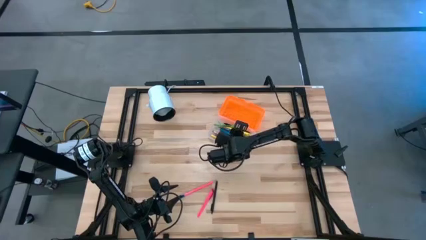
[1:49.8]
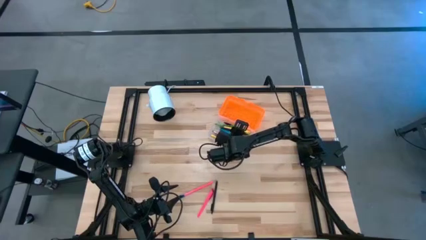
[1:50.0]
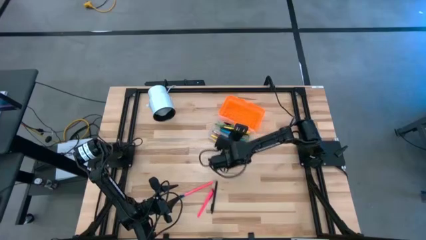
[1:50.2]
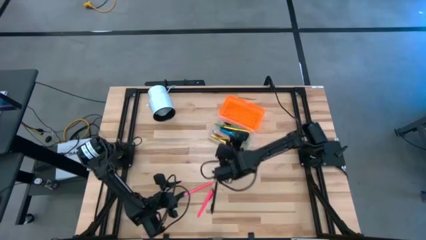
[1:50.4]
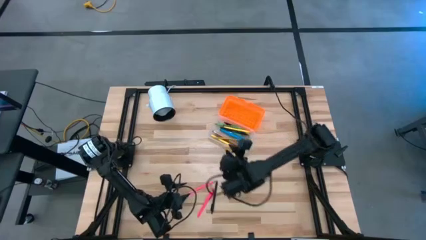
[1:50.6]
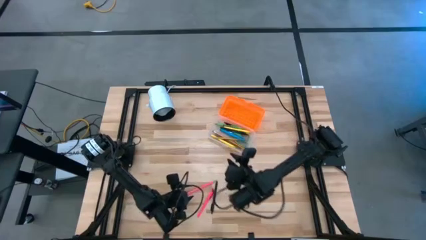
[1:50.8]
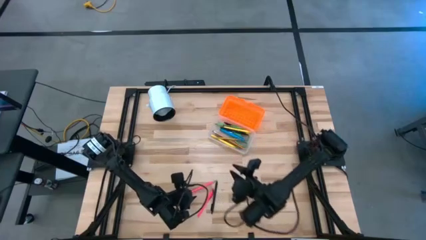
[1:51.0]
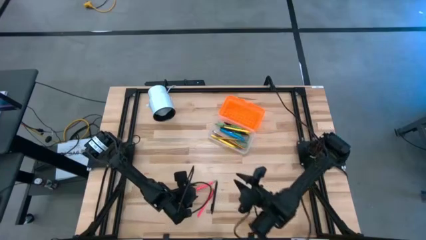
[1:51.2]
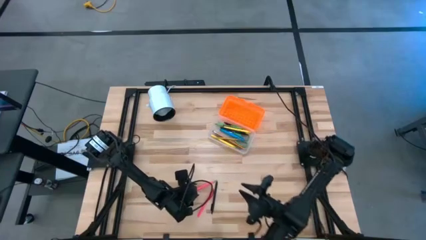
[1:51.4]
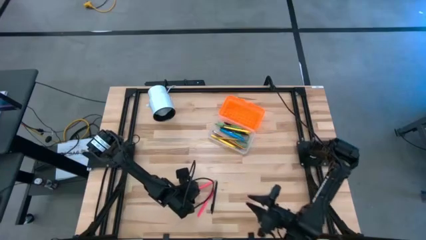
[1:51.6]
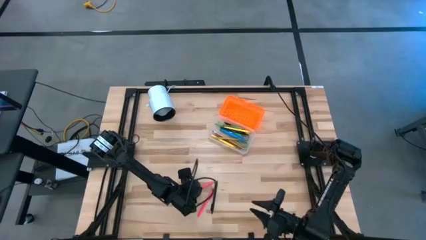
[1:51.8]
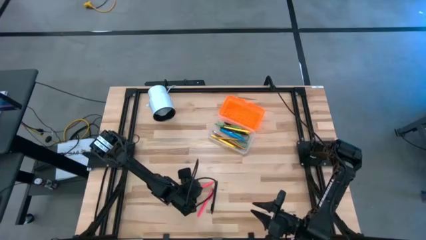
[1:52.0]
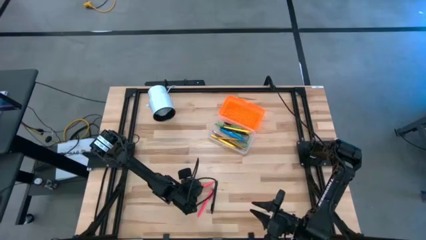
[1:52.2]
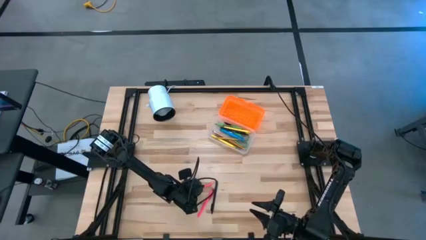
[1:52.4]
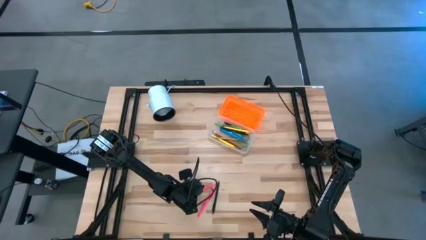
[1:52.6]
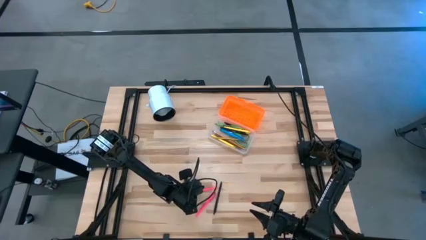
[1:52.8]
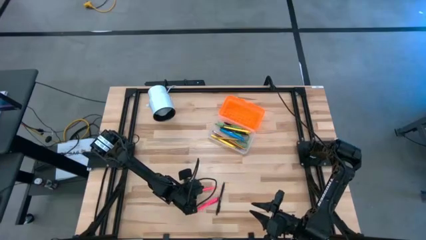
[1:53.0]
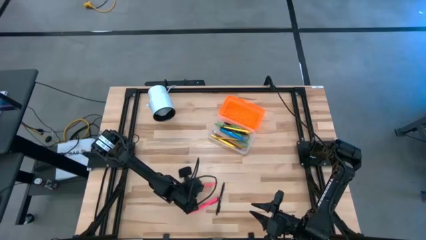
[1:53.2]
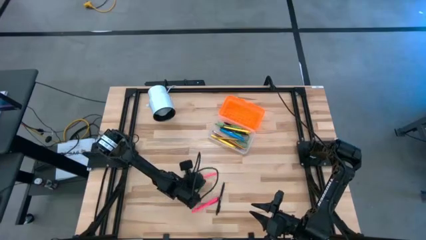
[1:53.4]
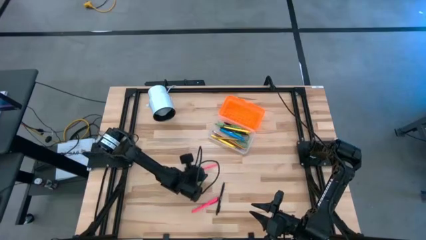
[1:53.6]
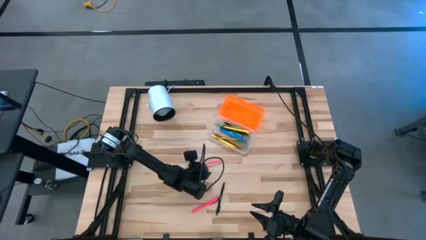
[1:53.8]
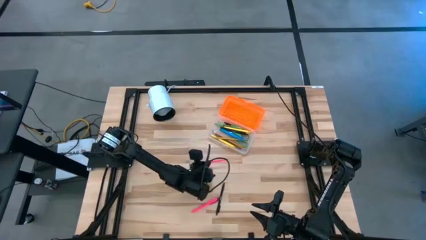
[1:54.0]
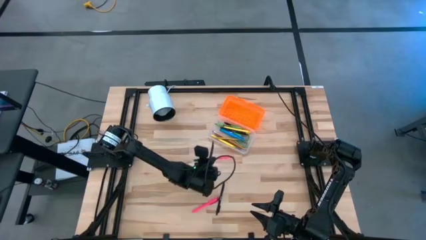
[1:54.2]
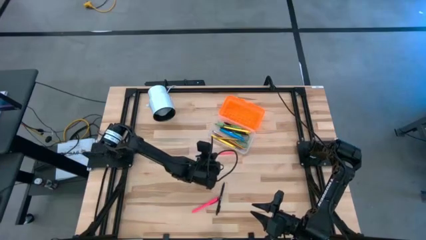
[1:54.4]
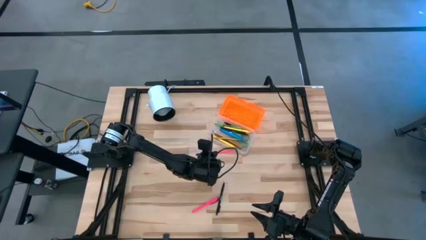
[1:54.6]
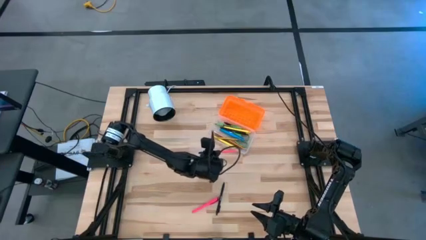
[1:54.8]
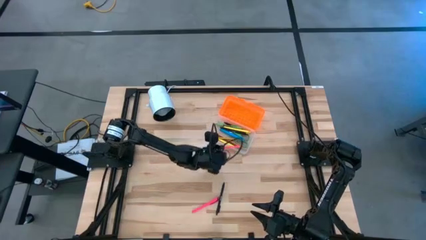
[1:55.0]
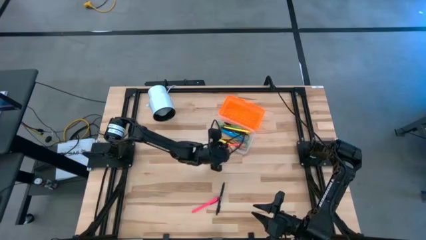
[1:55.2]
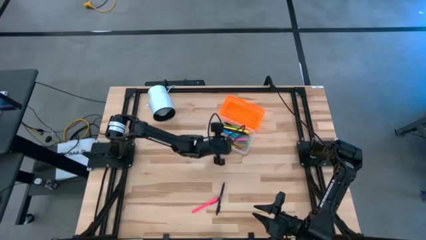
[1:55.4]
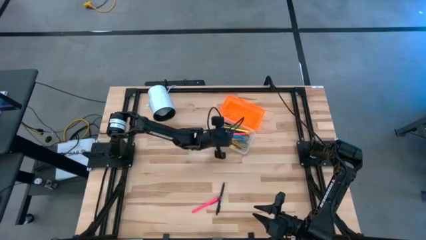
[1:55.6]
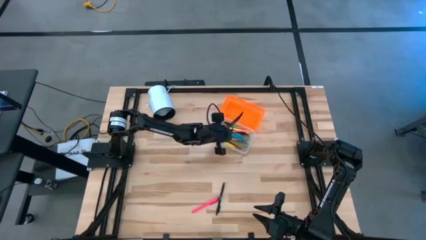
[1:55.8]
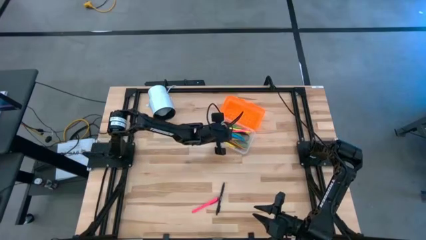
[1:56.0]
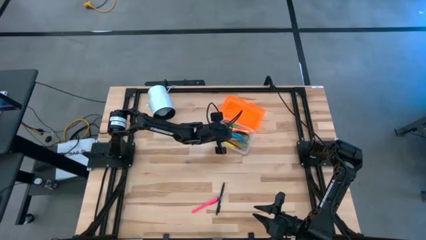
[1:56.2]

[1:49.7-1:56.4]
Task: Pick & place school supplies into a supply box
Put the pink pencil into the supply box

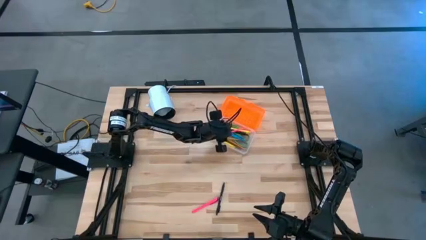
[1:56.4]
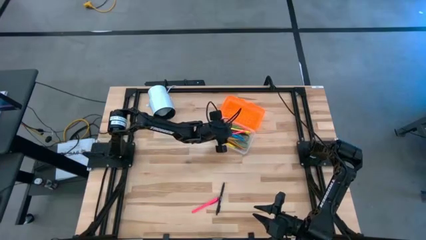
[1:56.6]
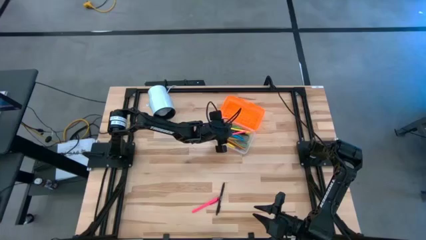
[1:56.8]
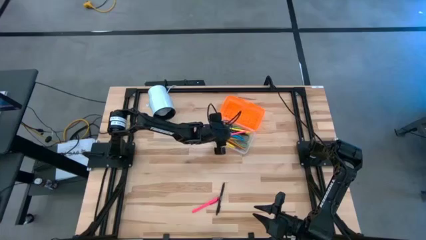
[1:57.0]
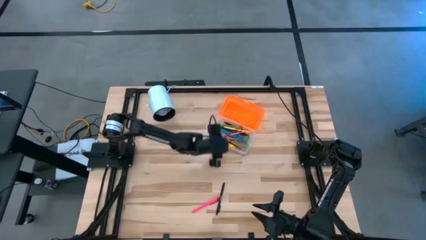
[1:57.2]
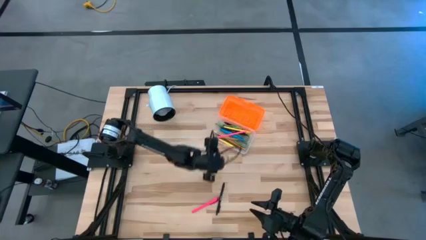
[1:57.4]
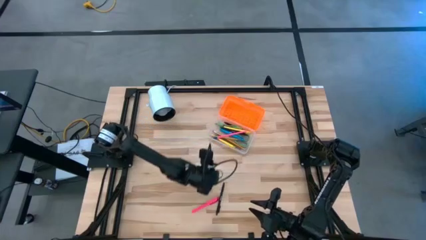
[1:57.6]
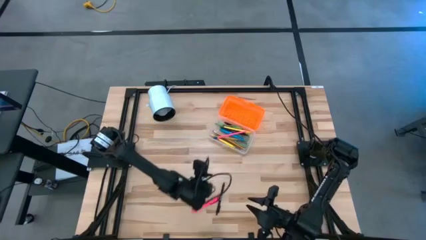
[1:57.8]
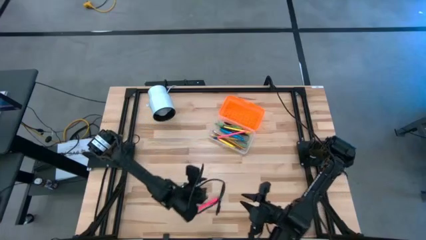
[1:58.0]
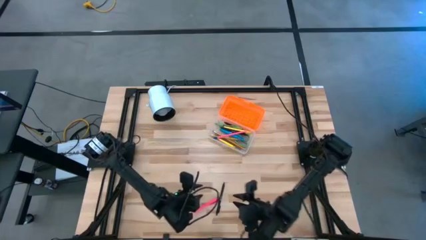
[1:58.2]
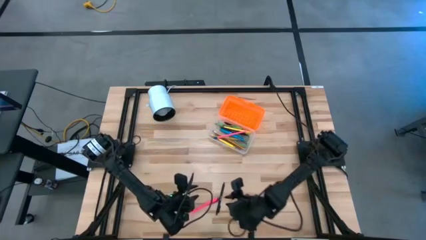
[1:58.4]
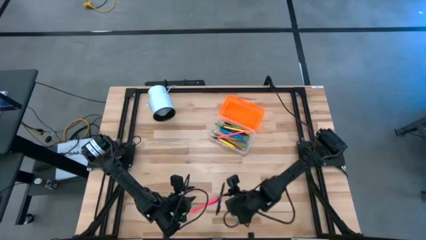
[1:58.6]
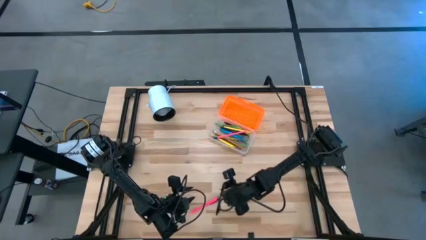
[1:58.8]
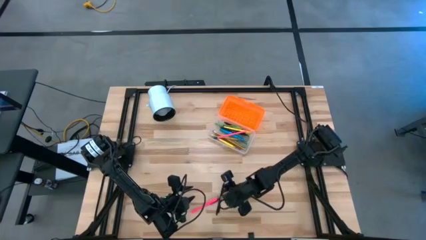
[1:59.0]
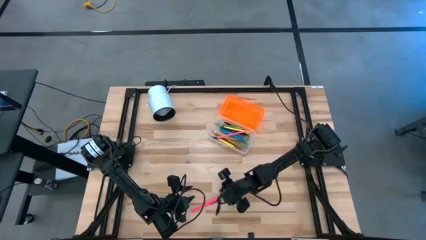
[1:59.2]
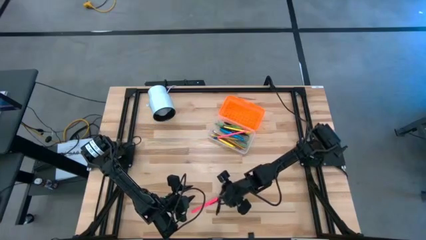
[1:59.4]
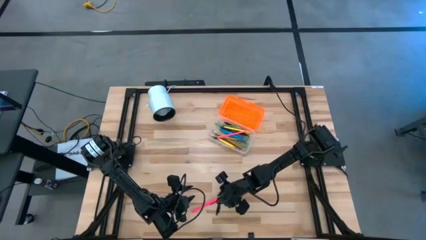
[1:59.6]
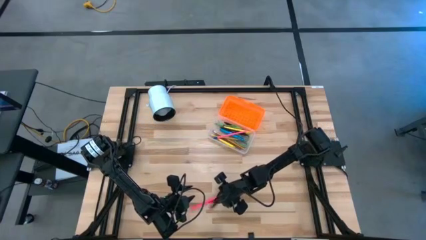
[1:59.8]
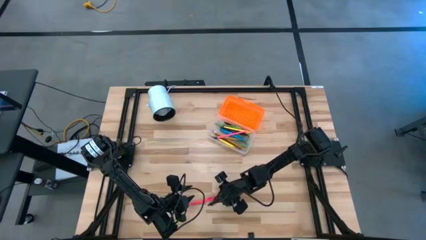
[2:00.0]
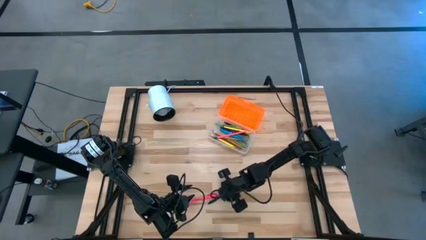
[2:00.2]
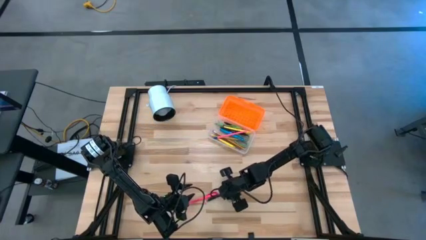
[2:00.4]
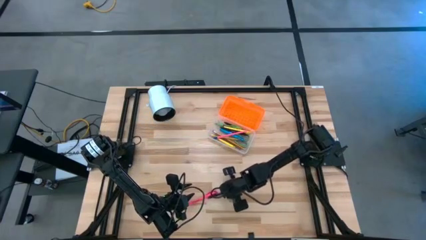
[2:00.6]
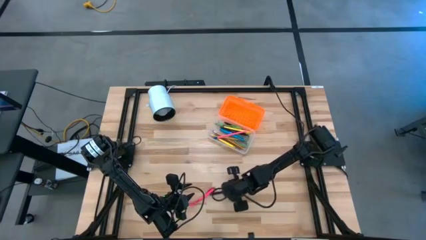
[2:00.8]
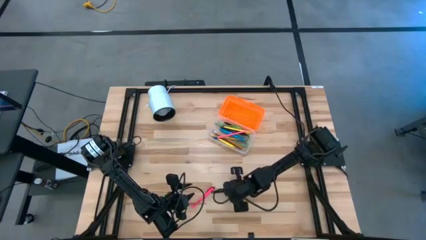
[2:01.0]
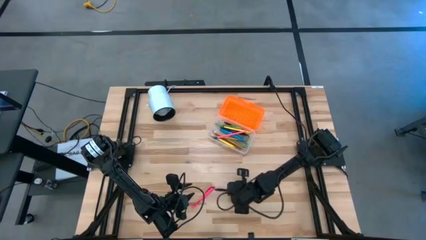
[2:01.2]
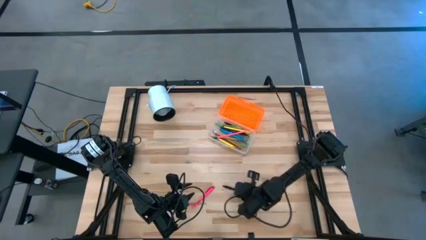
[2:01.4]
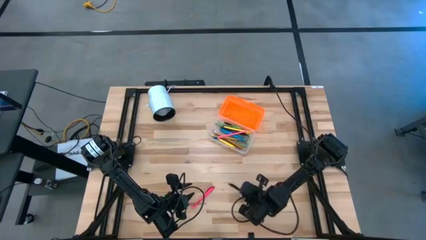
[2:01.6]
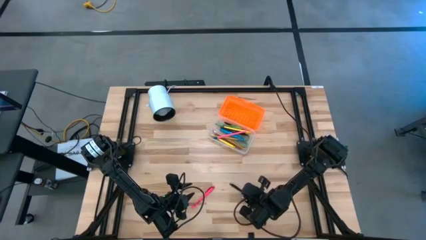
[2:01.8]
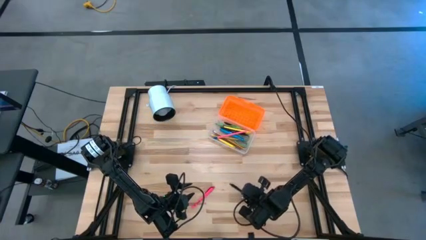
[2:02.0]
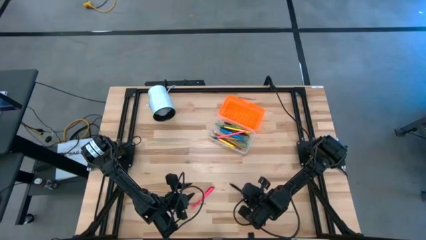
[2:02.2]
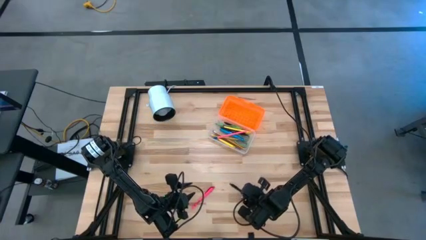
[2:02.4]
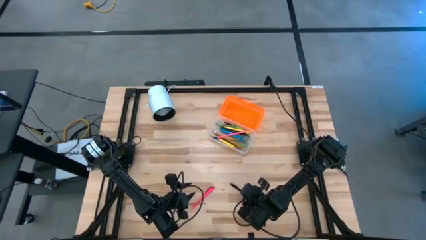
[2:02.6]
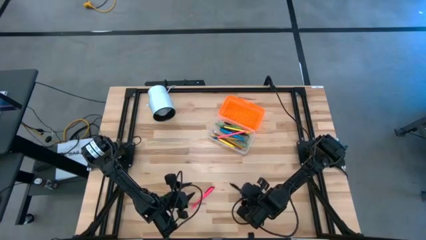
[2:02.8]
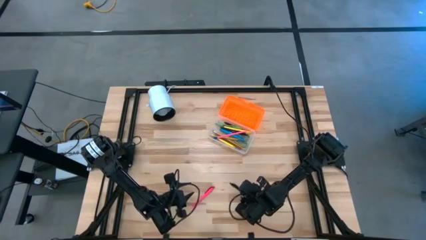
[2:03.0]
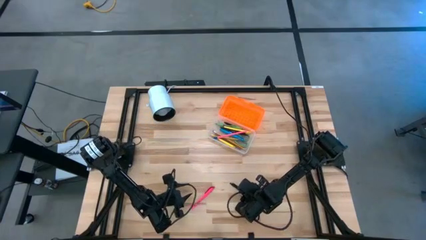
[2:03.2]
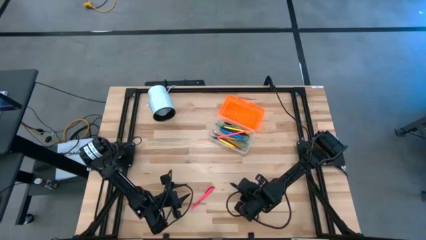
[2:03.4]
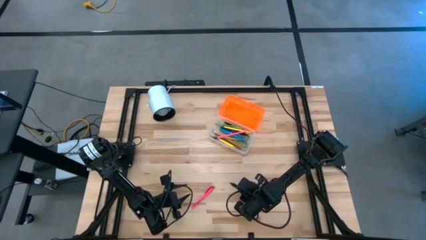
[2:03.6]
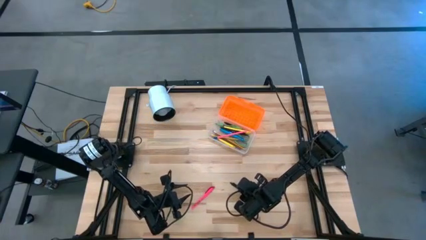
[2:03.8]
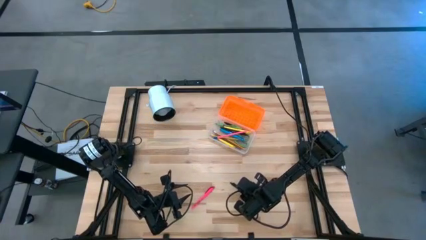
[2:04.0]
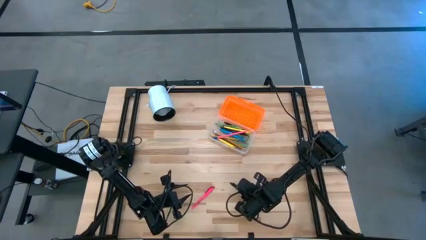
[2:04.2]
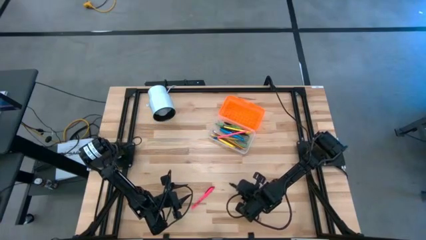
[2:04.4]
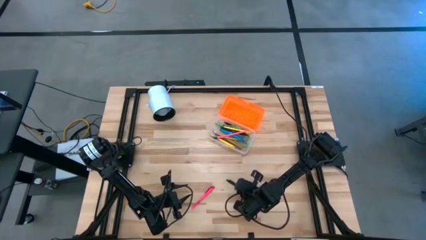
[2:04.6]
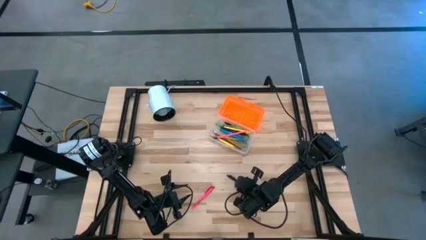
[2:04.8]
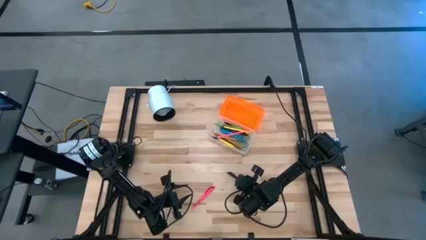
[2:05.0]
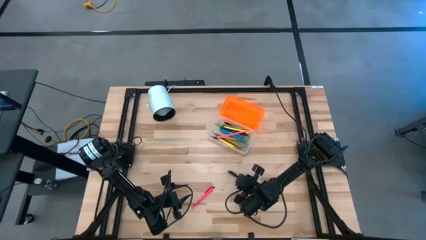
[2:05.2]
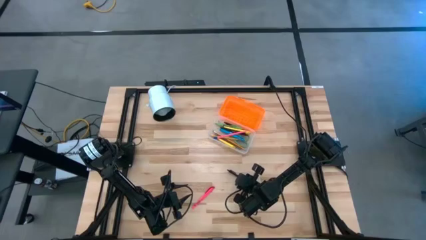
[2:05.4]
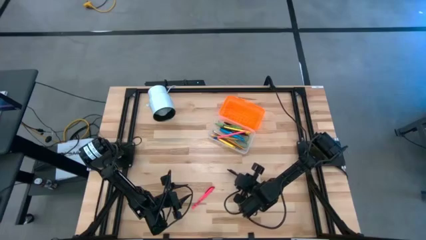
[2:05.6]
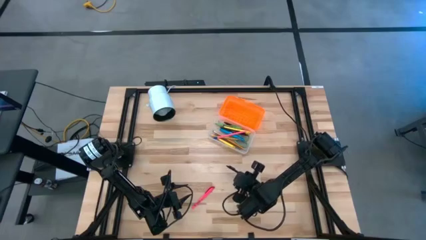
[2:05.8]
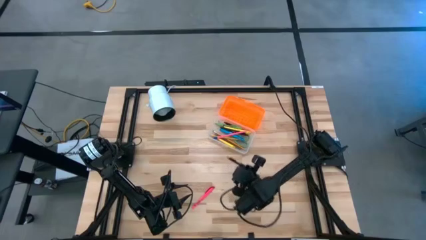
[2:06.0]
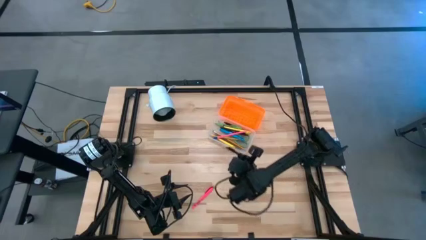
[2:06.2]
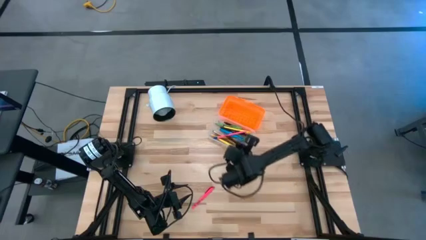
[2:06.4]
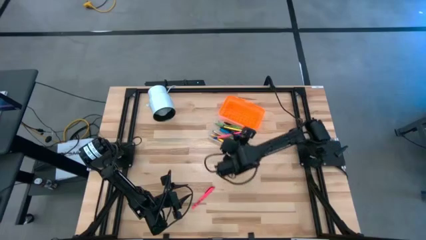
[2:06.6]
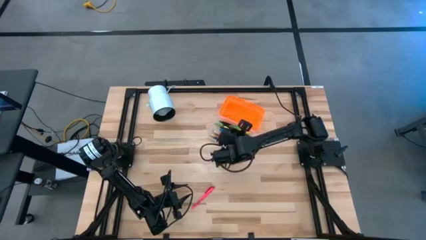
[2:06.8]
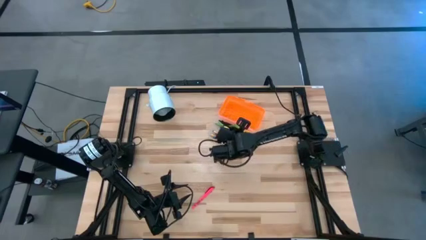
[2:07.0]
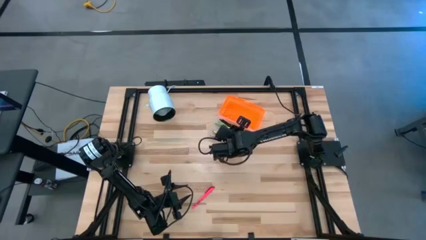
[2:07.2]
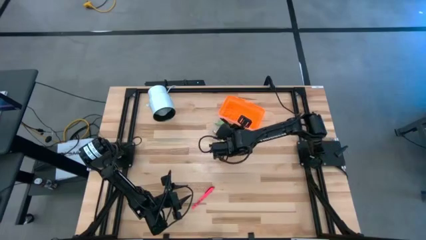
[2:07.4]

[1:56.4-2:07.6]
Put the black pen into the supply box
